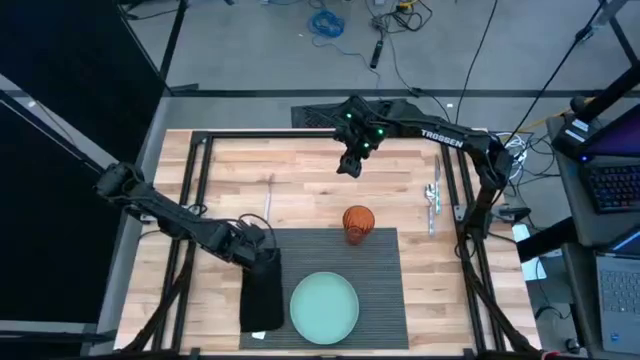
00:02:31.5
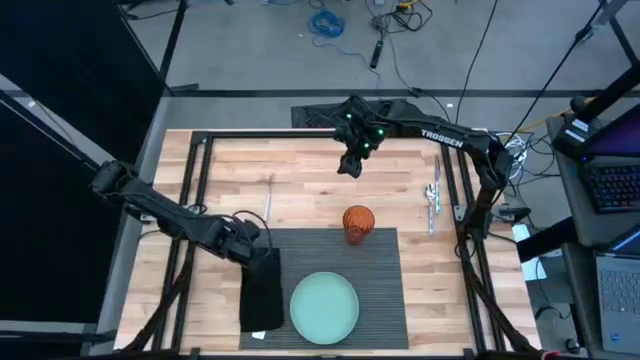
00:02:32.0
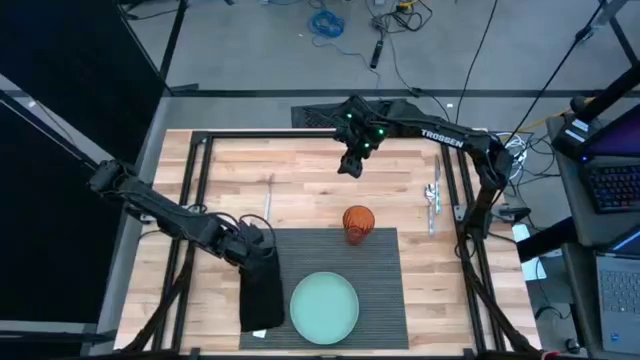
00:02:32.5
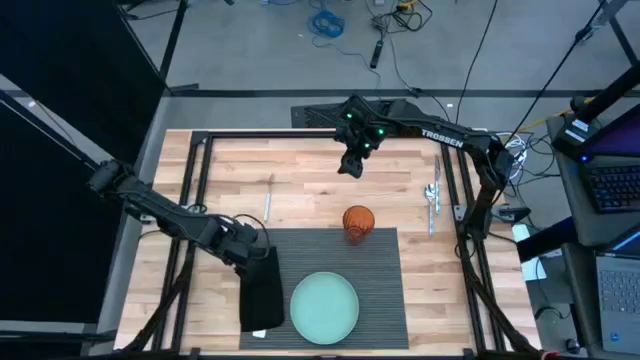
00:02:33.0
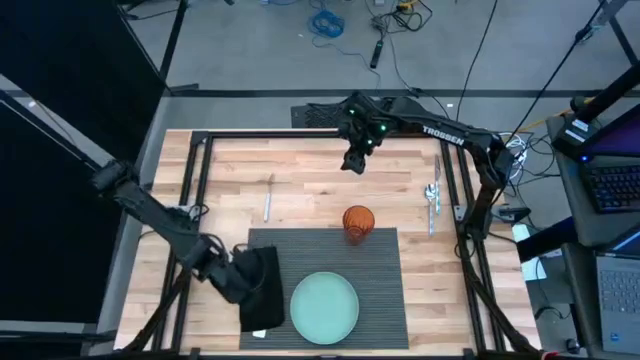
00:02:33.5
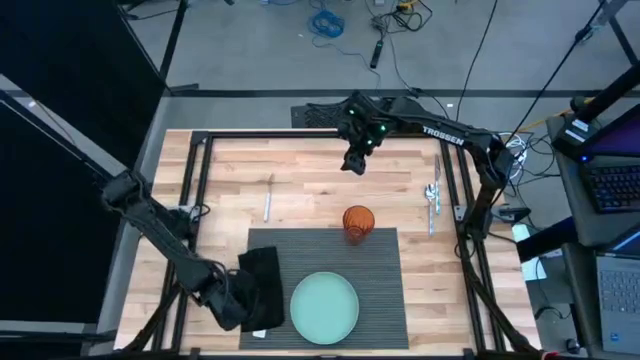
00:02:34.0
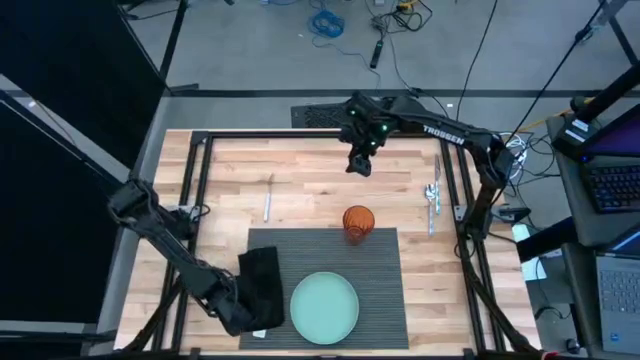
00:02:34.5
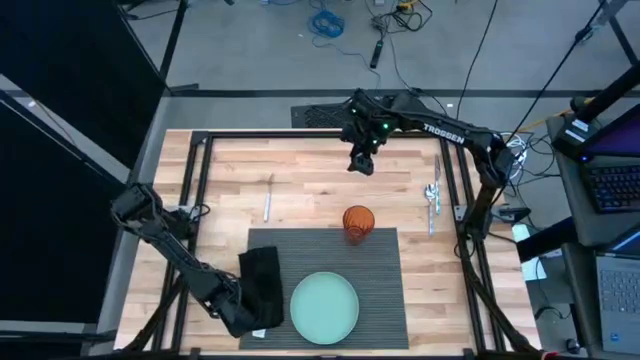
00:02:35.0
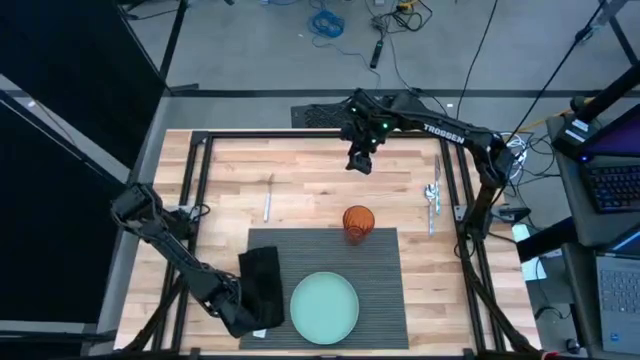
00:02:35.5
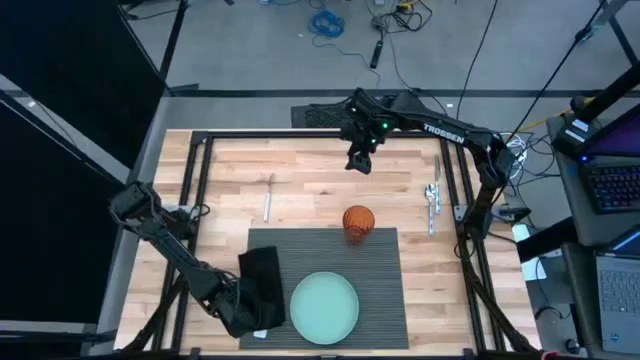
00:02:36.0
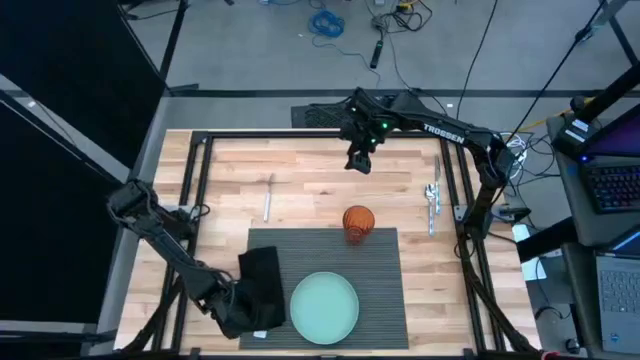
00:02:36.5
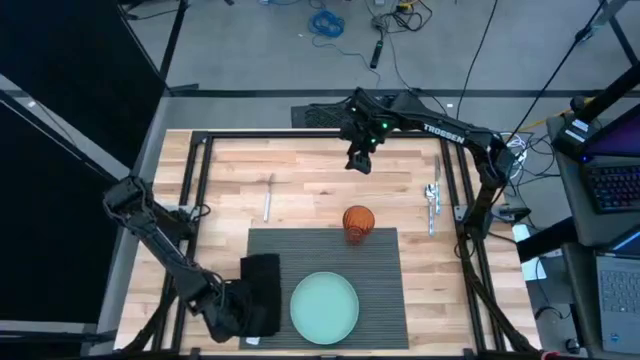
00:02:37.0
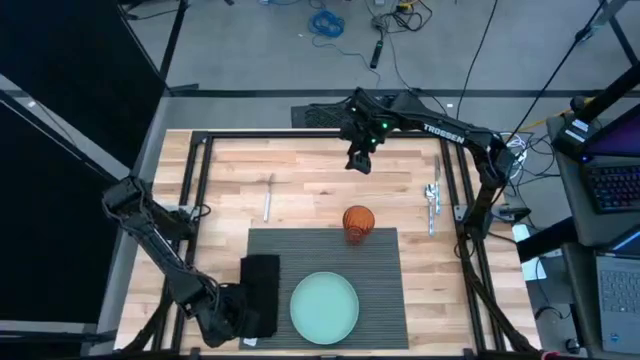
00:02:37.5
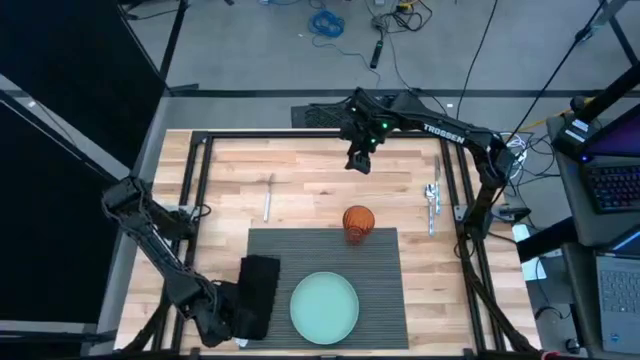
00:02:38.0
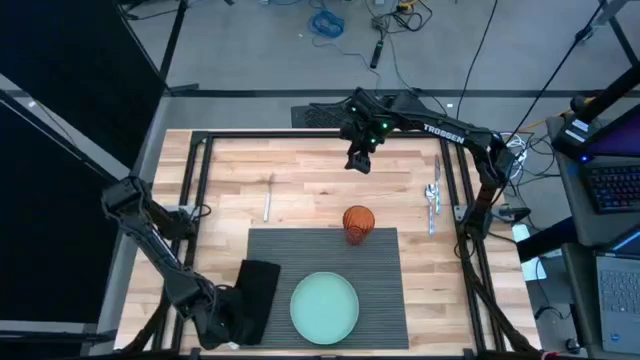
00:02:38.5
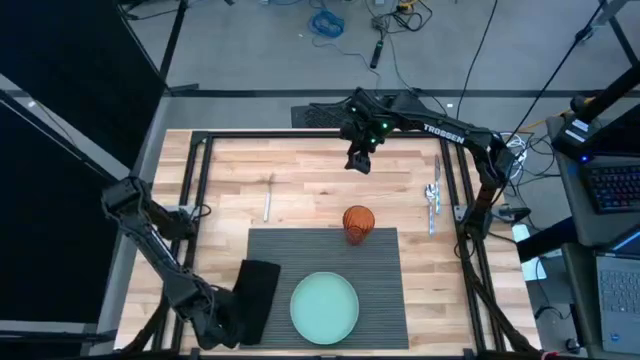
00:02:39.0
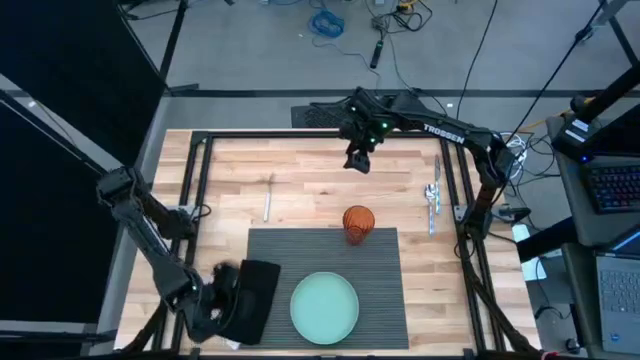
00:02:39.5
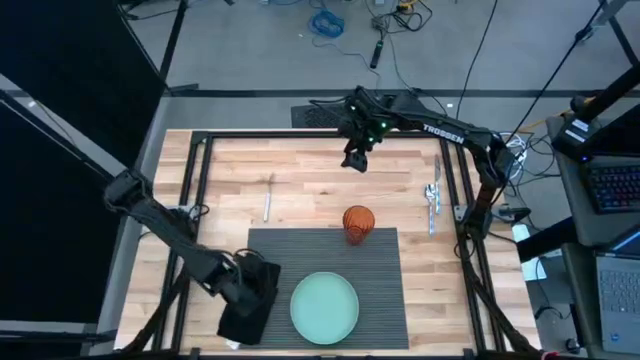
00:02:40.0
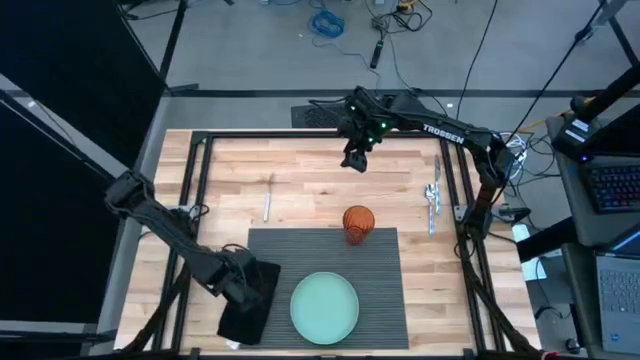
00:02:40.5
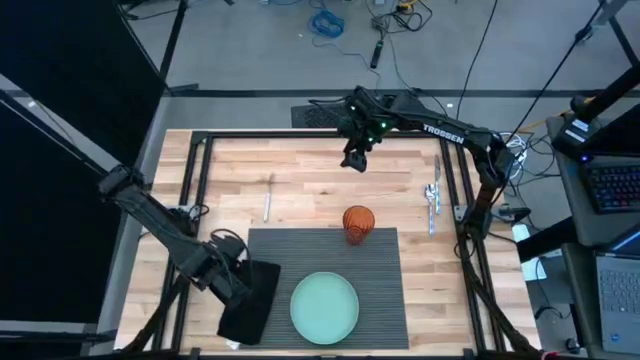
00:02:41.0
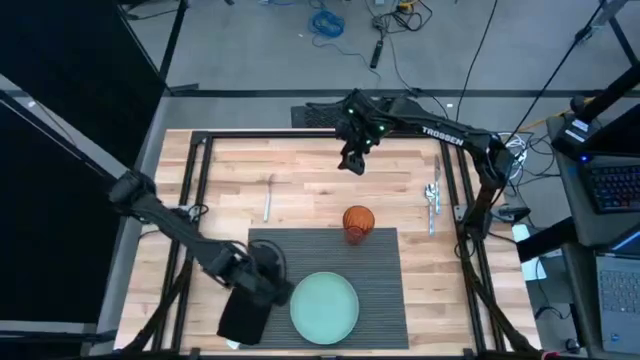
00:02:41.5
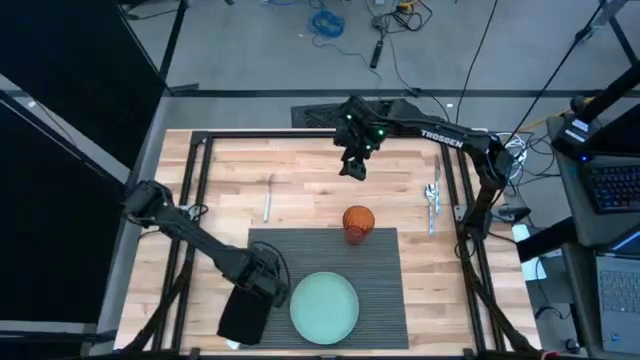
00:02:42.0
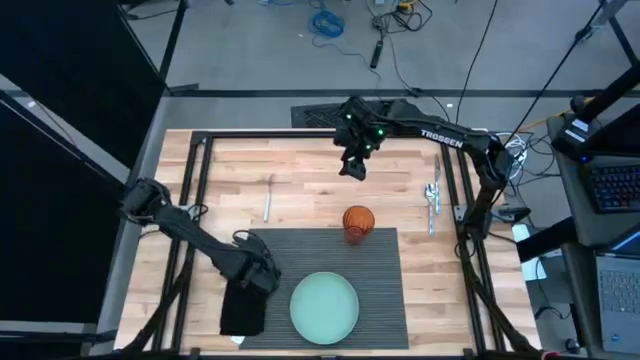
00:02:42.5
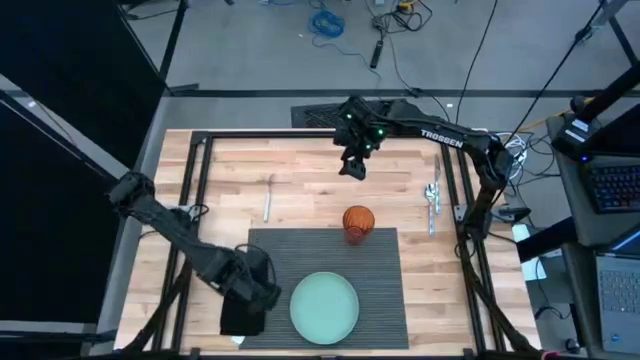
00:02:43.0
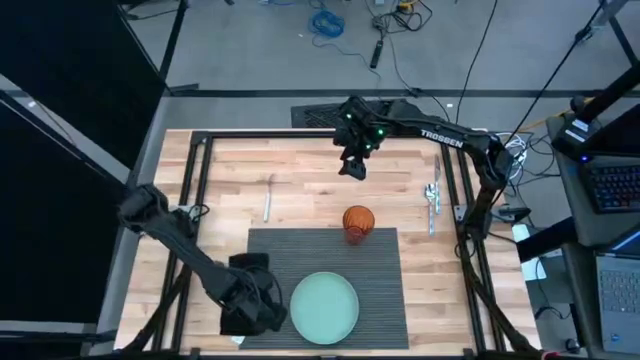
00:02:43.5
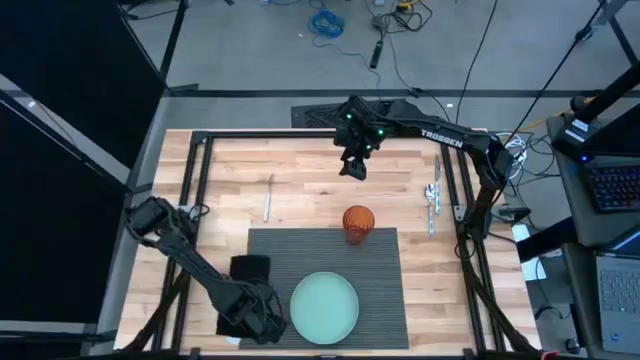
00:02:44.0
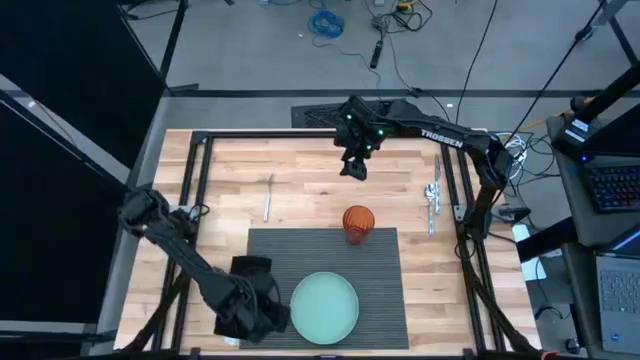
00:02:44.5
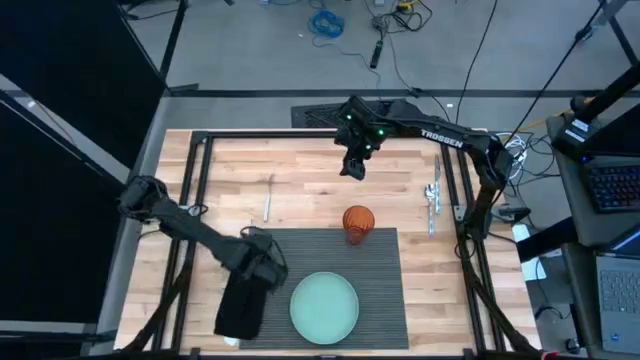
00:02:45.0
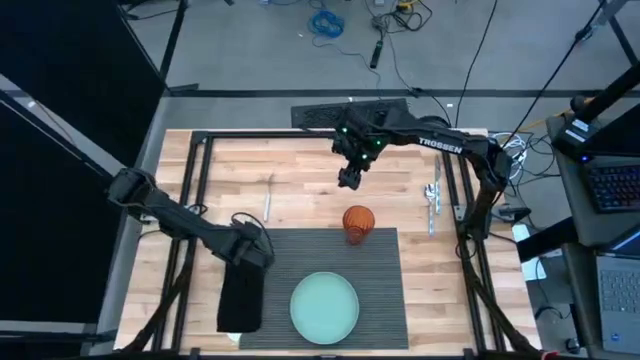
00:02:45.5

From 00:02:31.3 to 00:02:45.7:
Task: Set table place
Put the black napkin on the gray mat to the left of the green plate

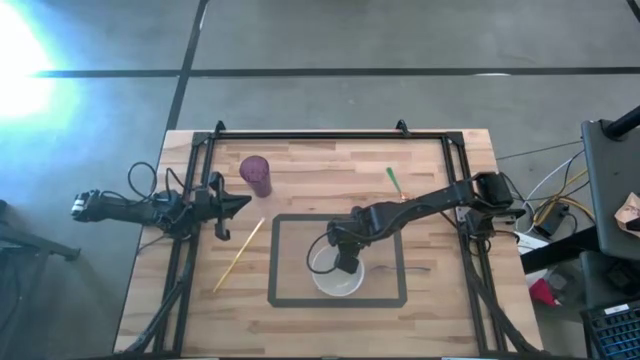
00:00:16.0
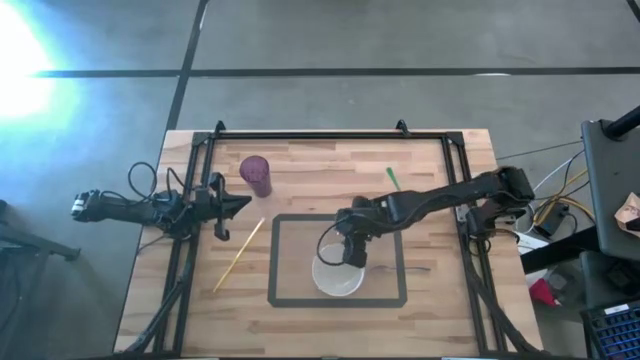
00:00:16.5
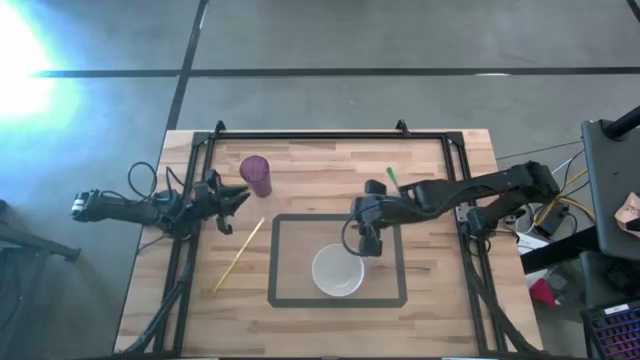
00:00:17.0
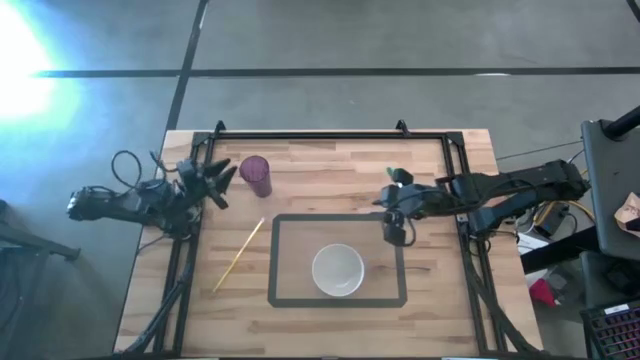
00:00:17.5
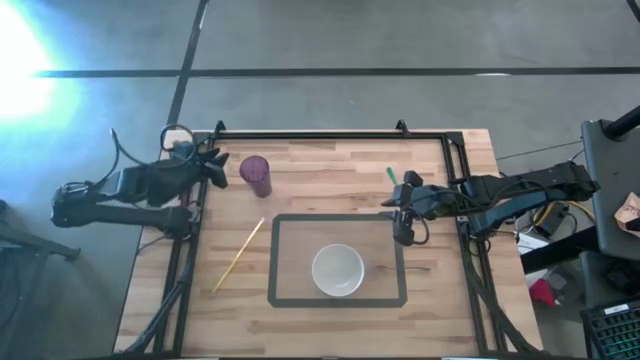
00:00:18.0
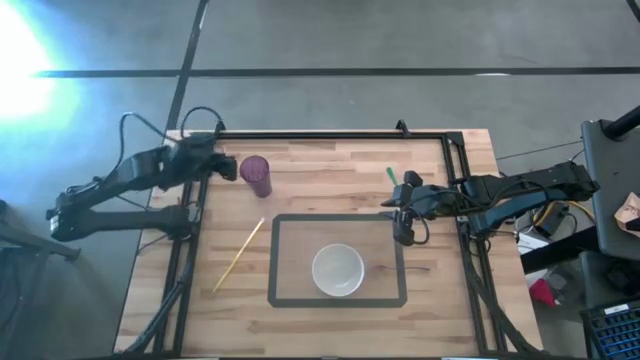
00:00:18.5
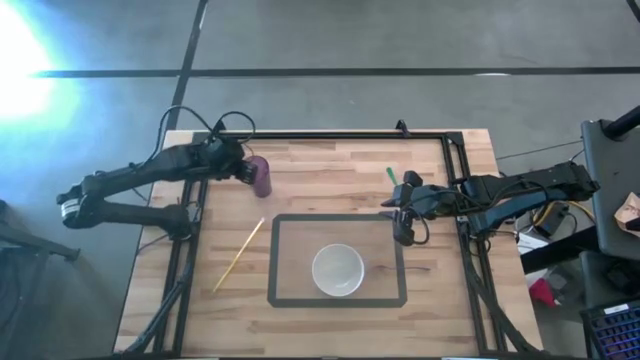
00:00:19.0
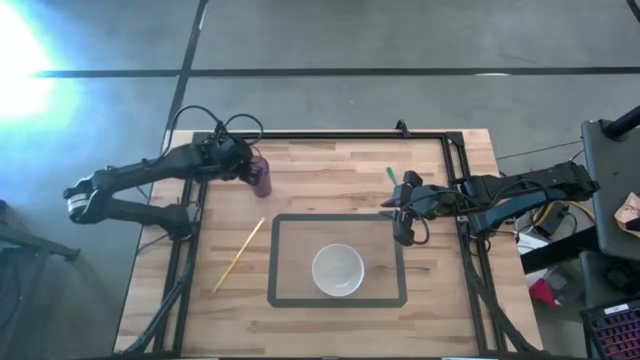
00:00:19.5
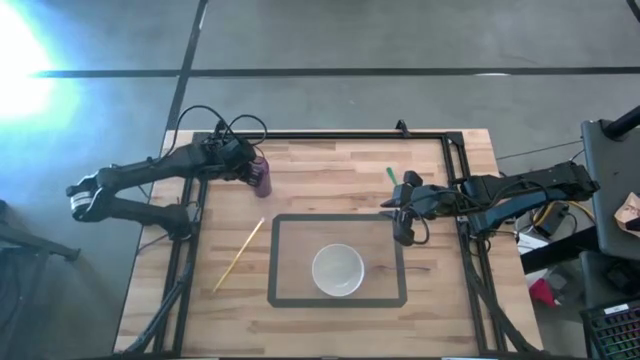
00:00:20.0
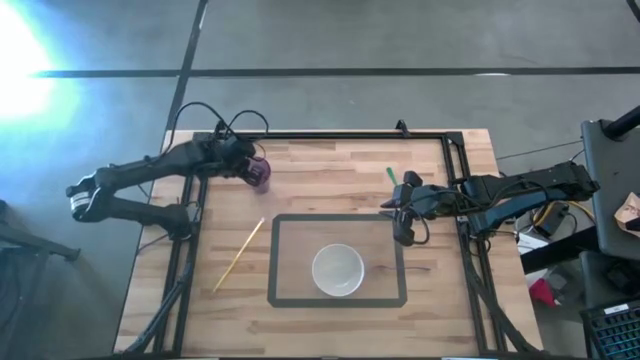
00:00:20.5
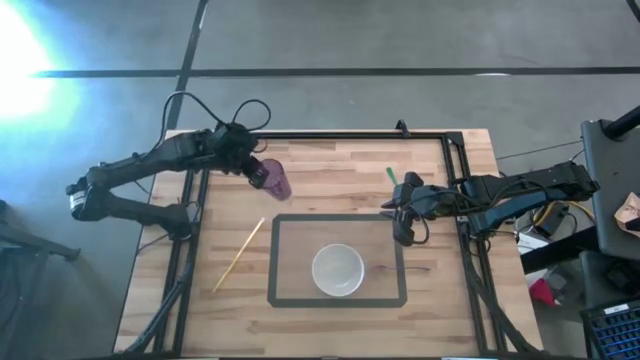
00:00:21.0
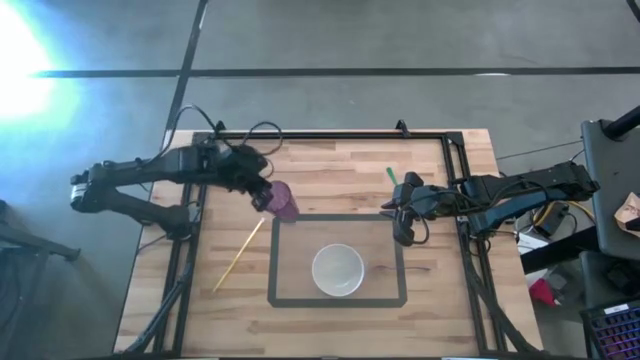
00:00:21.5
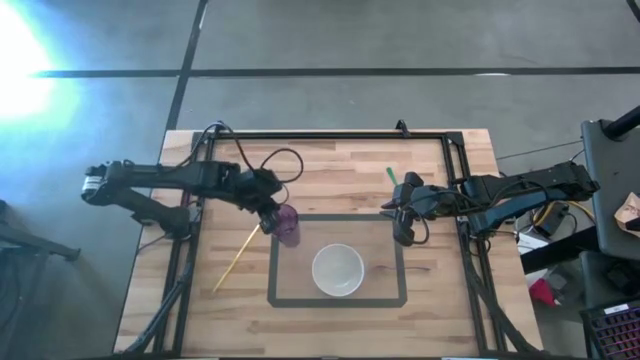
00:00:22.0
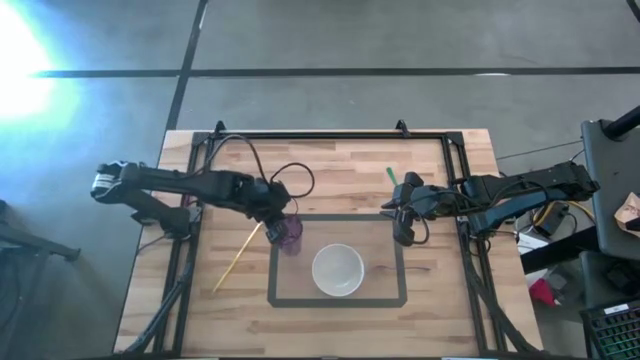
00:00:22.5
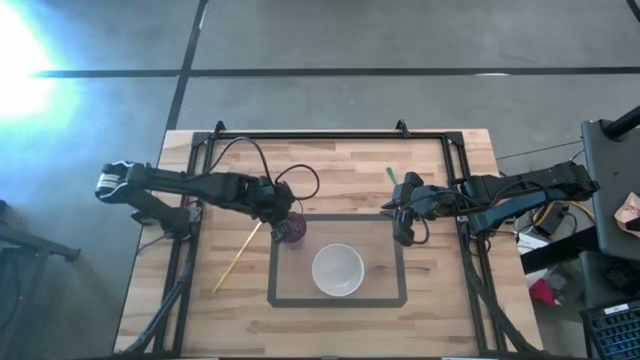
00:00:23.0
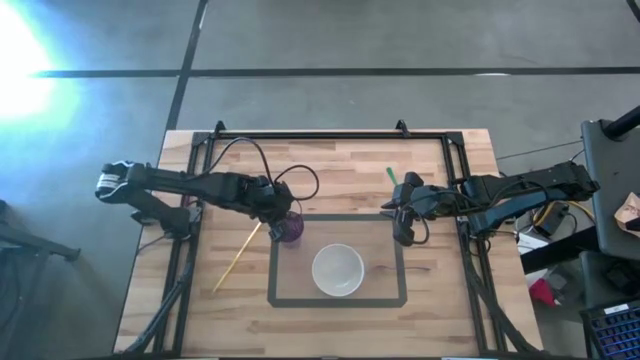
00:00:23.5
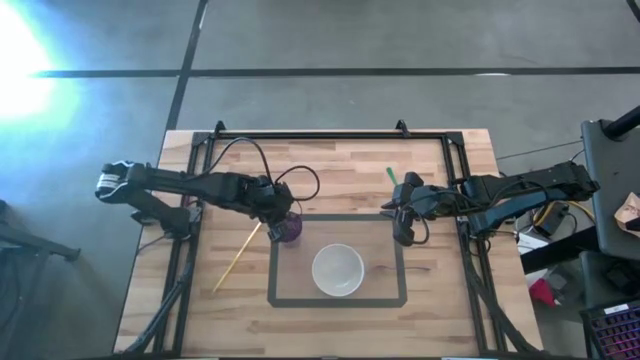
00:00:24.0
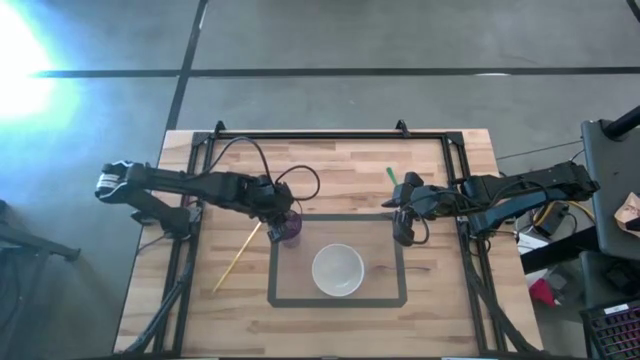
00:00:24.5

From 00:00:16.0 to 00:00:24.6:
Task: Pick & Place Utensil
Put the purple cup to the top left of the white bowl on the transparent mat
